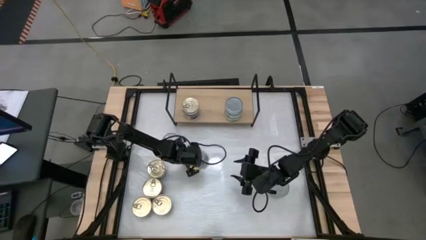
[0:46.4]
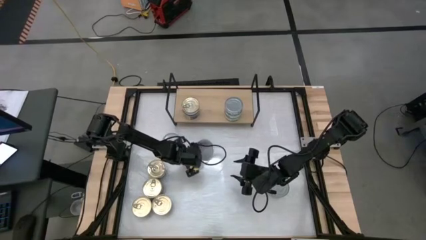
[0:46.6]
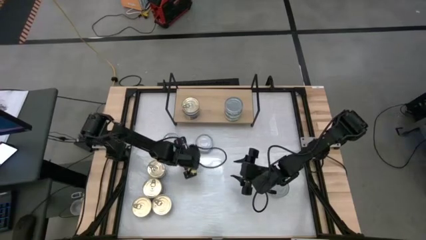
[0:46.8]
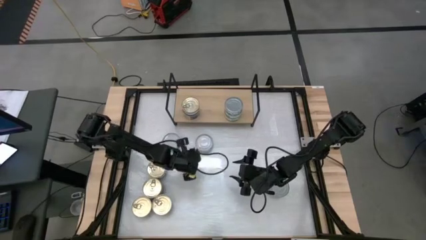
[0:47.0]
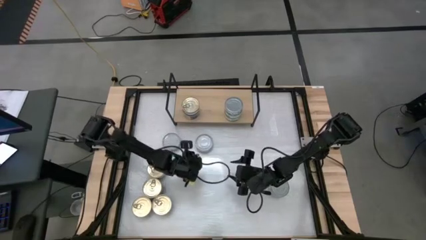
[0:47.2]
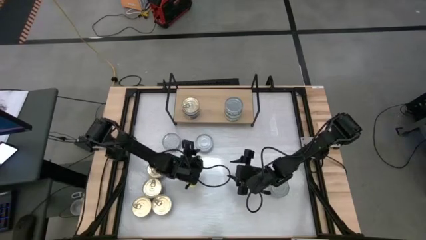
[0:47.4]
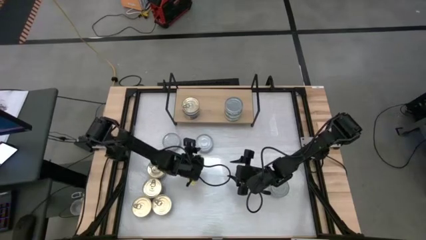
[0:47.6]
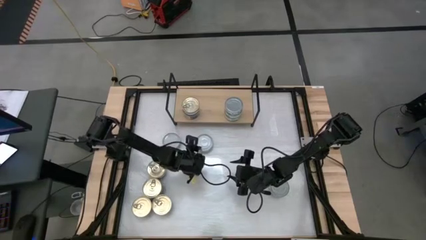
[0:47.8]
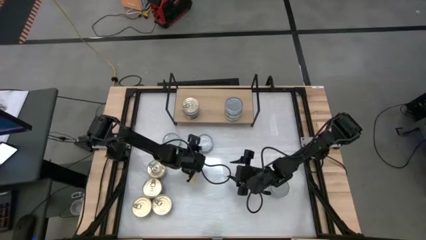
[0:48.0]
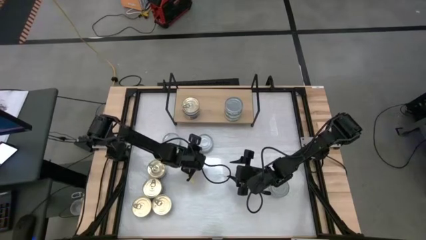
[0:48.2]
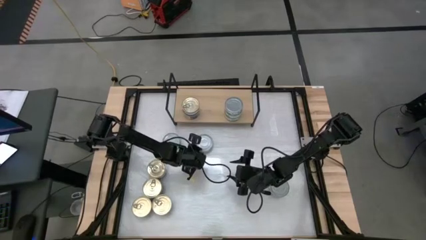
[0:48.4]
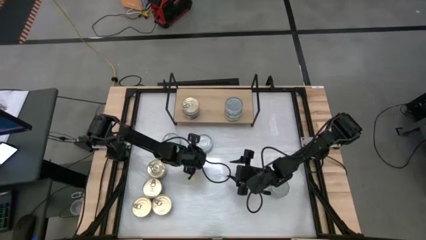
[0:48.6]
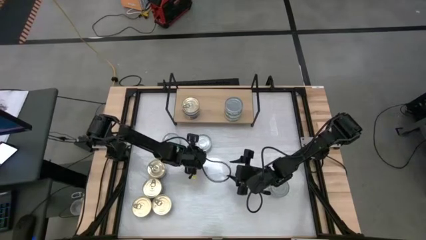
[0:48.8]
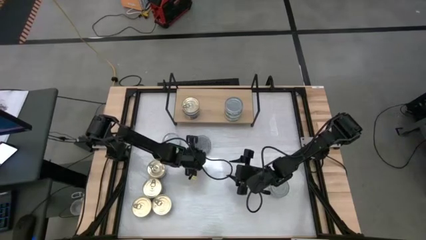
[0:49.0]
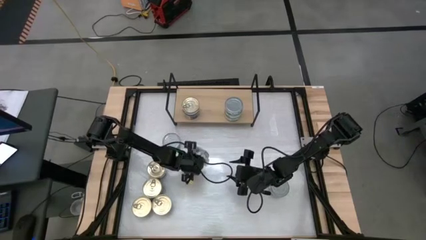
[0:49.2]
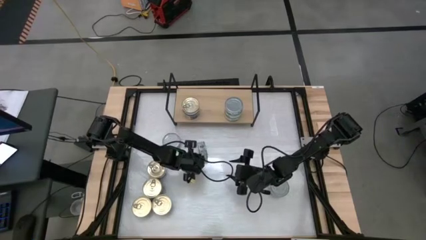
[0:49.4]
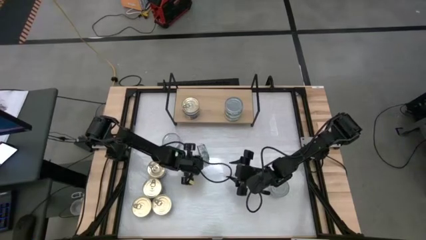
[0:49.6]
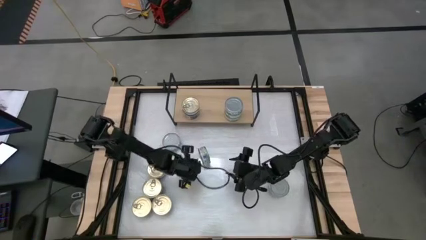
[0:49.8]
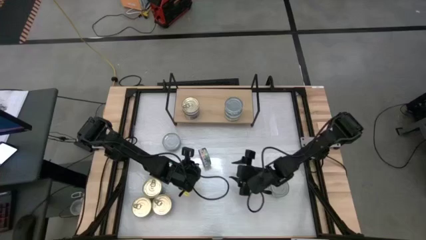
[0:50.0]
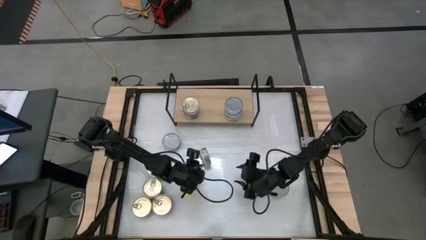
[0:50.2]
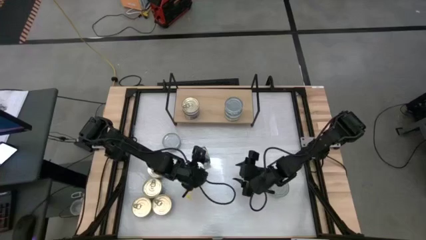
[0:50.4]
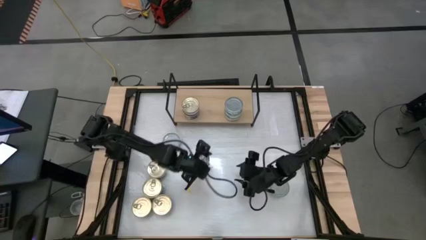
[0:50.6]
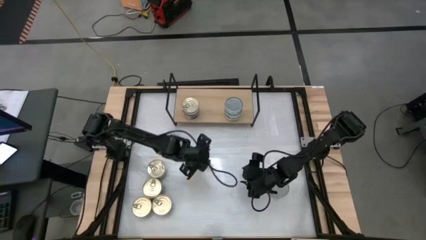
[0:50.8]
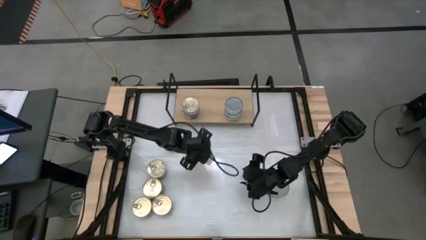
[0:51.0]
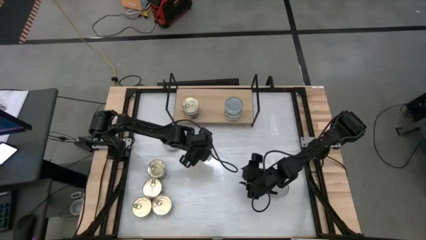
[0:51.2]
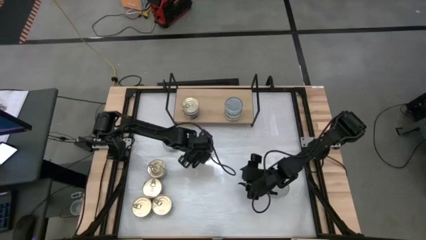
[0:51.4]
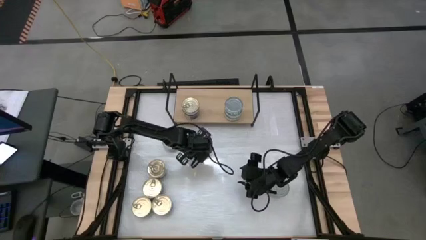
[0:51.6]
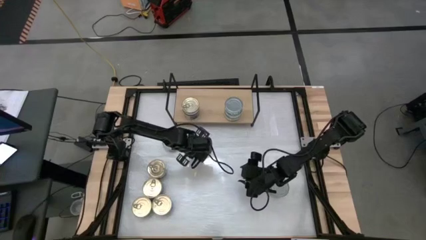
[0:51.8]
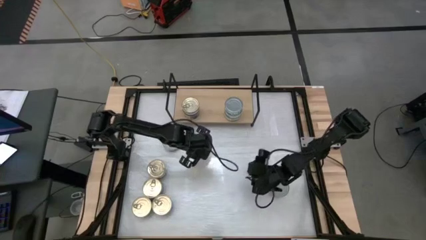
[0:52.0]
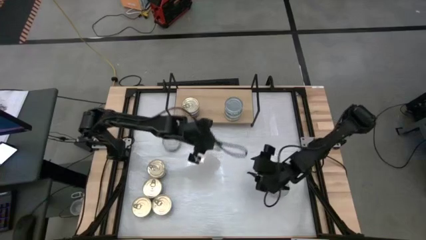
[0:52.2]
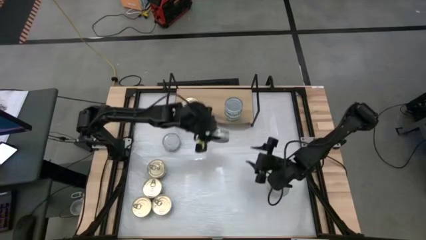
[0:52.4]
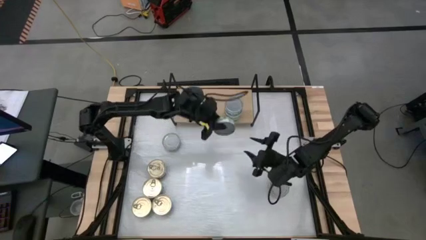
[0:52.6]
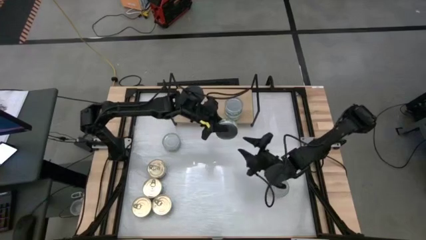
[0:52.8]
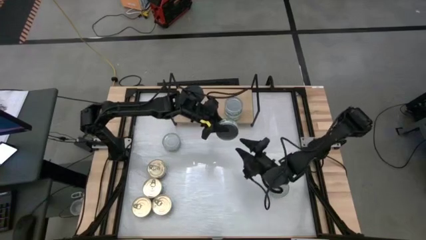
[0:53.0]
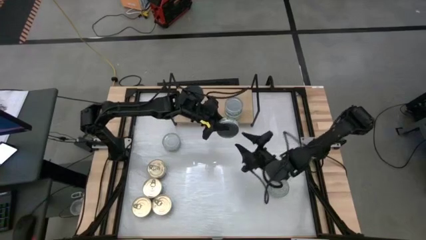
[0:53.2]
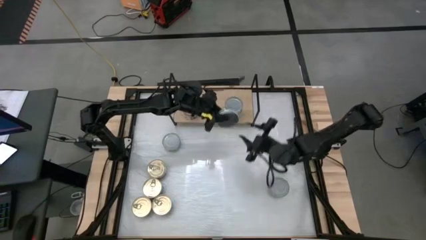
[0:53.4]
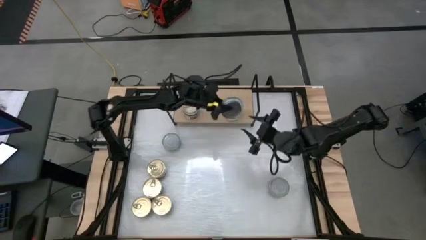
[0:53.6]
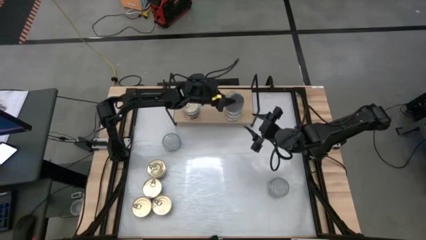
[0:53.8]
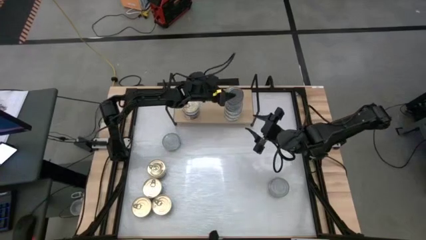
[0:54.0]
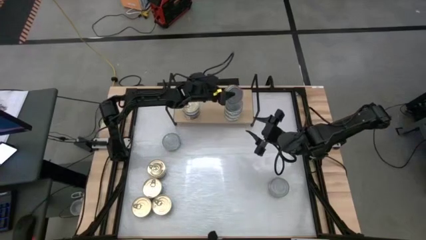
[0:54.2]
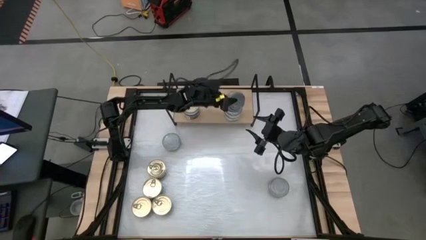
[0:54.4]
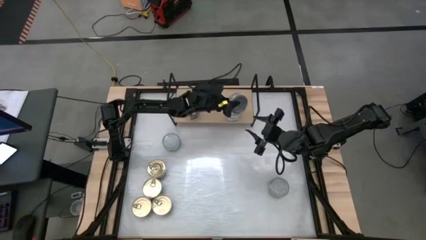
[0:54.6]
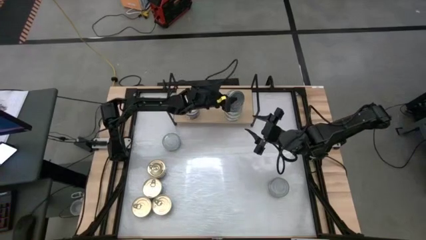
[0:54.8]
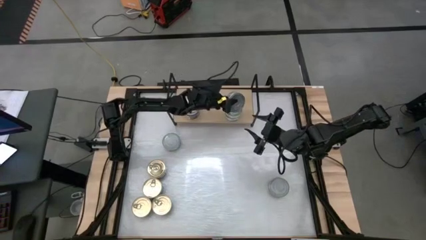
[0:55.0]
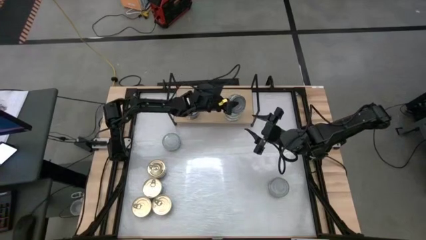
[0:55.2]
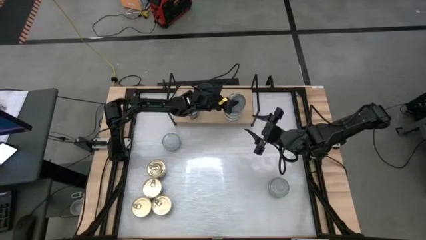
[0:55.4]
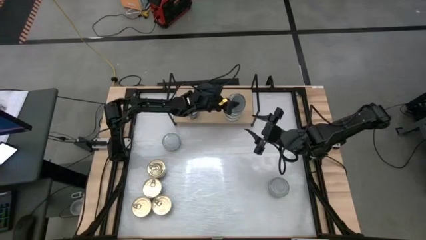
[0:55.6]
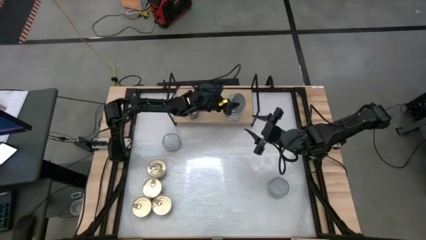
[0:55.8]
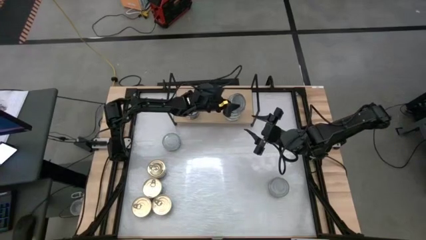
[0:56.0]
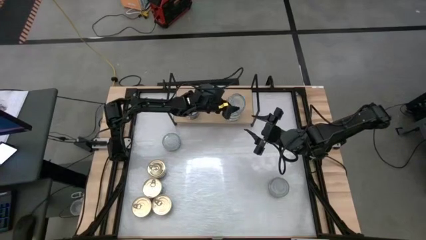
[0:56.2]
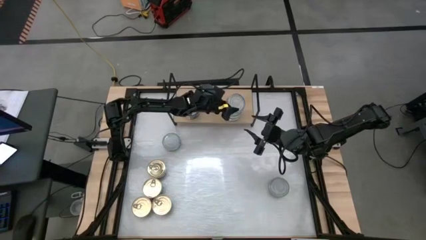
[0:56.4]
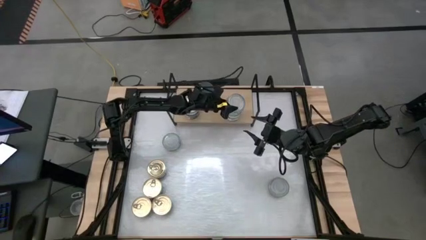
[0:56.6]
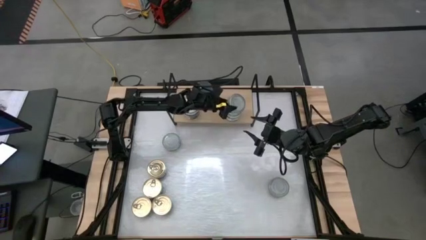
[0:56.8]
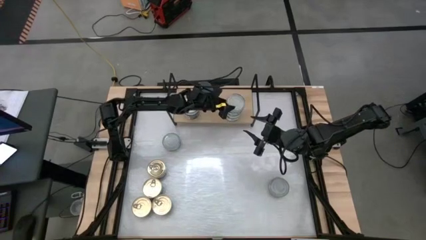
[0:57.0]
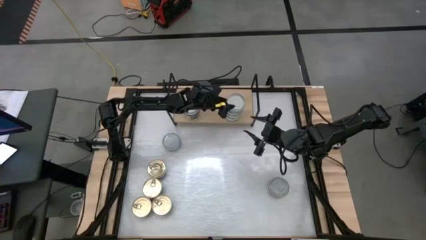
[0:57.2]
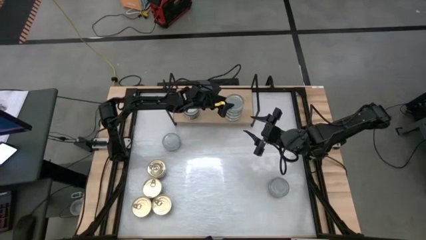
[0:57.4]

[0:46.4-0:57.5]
Task: Stack canned seafood by type on shelf
Stack the green tuna can on top of the green tuna can on the shelf

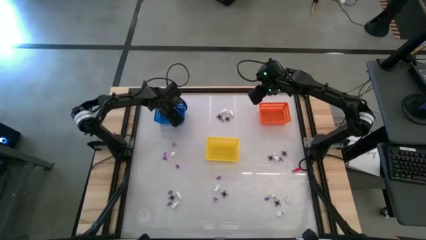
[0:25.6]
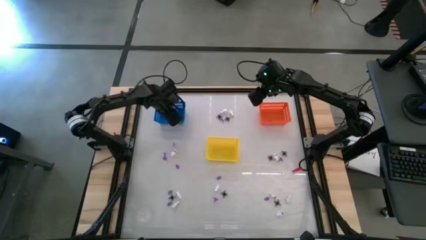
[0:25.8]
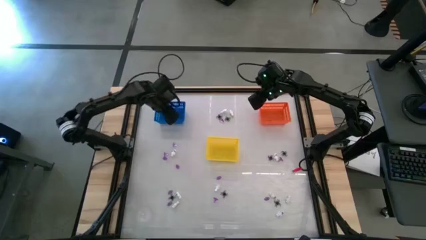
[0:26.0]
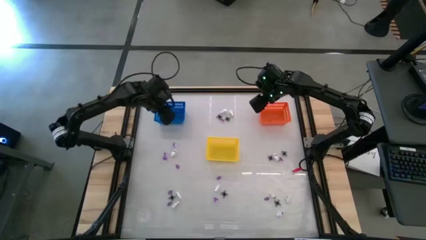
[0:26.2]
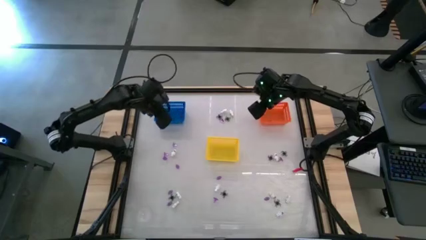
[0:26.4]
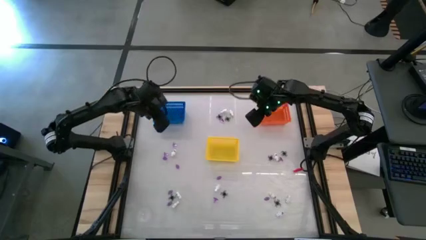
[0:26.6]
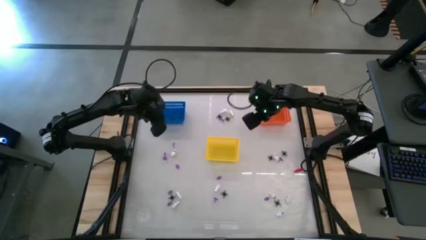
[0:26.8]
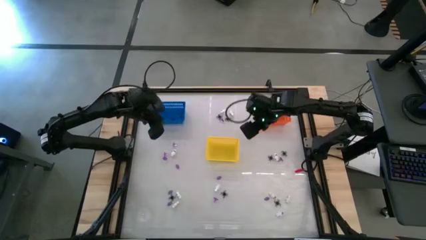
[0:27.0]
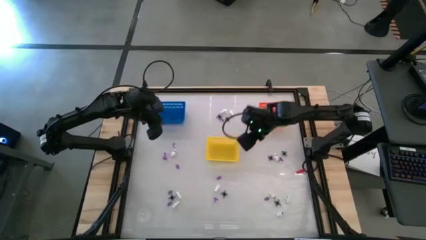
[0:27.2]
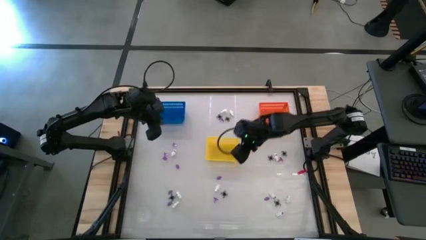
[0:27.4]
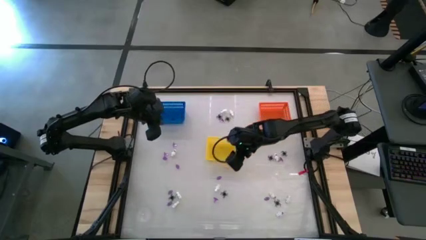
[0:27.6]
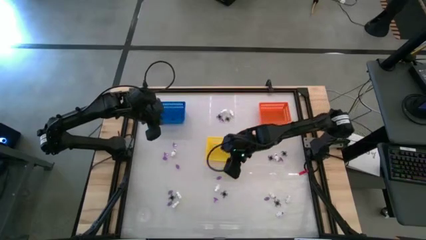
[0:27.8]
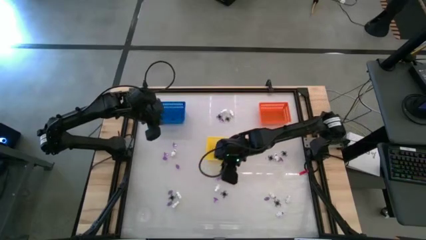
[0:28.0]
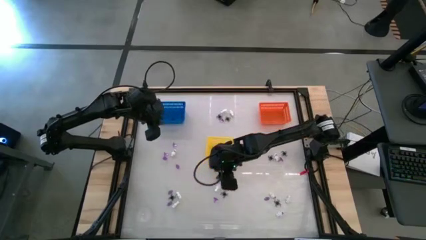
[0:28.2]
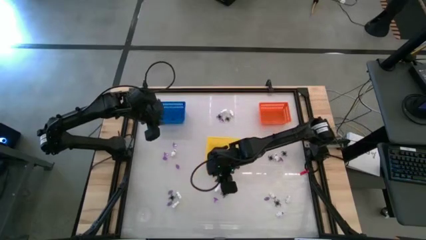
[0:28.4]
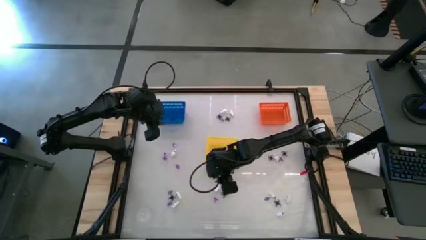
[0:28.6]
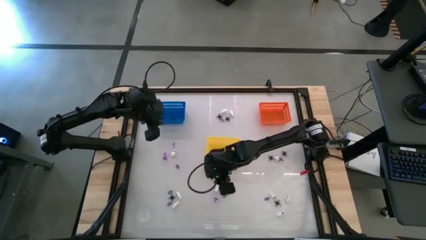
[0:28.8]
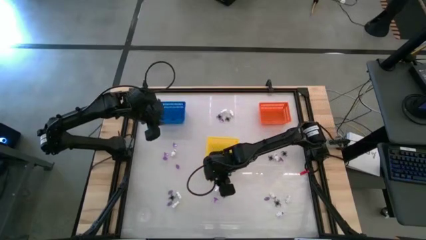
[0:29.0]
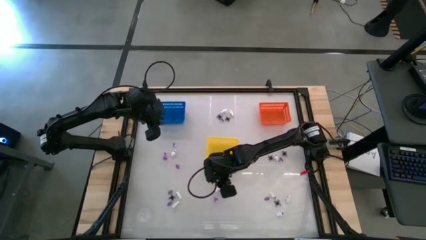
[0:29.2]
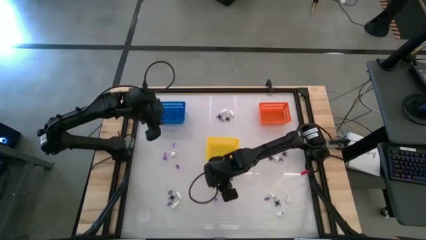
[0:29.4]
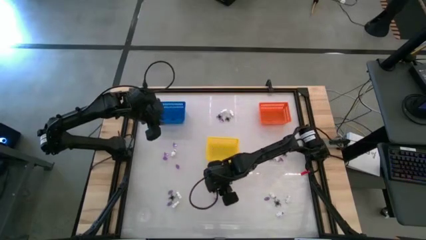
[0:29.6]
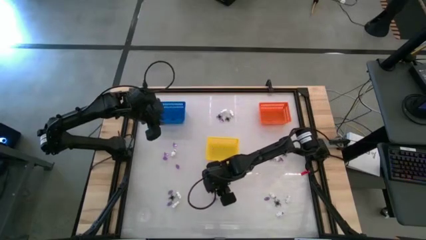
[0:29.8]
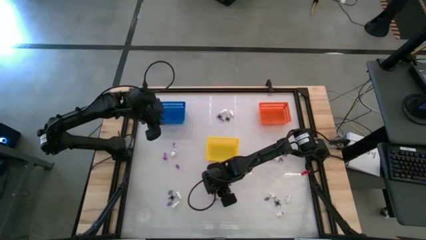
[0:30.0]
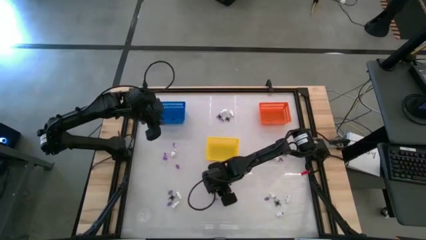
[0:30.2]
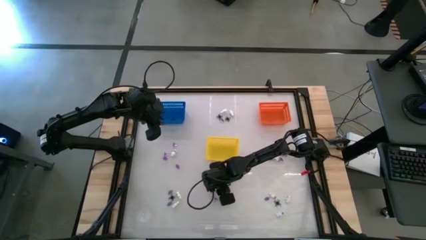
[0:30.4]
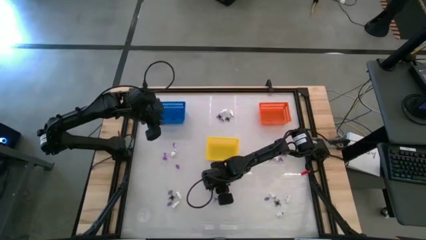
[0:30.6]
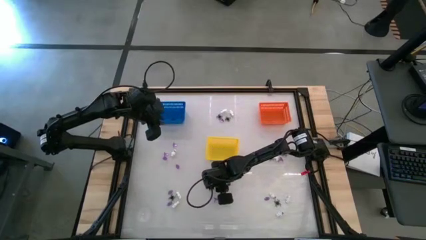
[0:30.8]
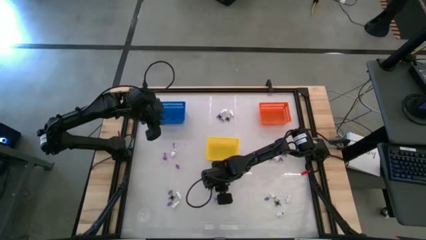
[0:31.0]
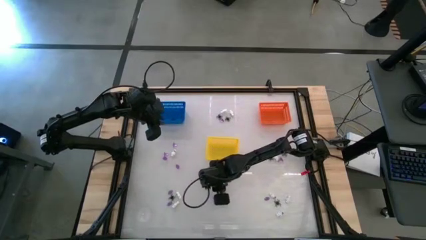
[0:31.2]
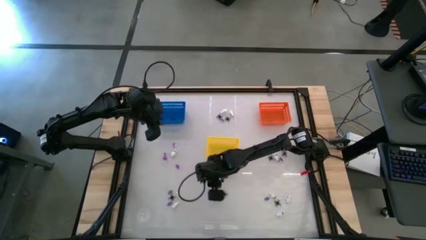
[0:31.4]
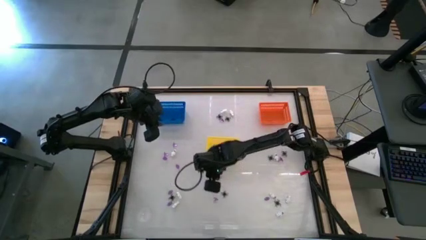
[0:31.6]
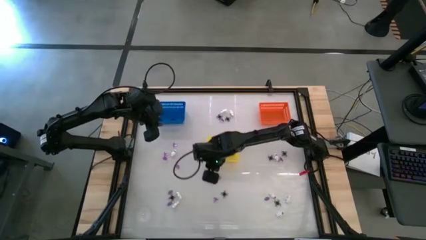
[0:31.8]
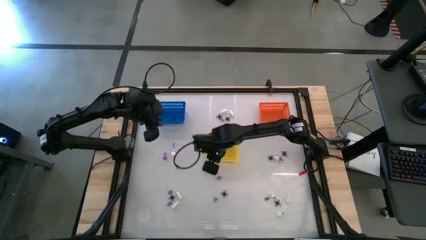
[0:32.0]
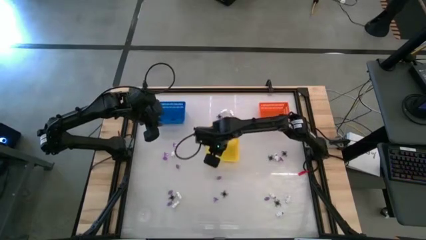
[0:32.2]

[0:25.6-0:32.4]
Task: Sort Halloween decoration
Put the white skeleton toy into the yellow bin
